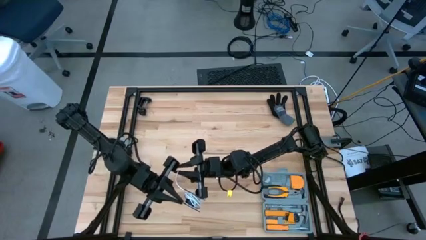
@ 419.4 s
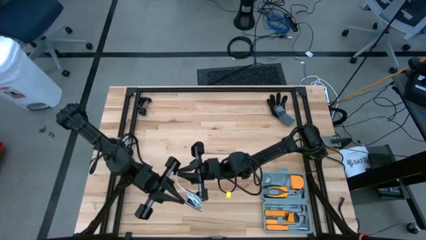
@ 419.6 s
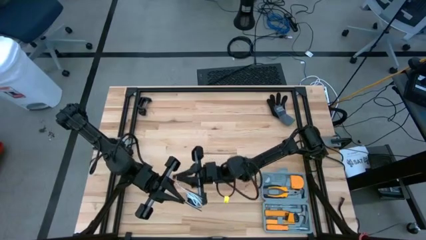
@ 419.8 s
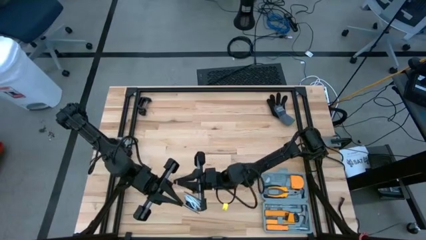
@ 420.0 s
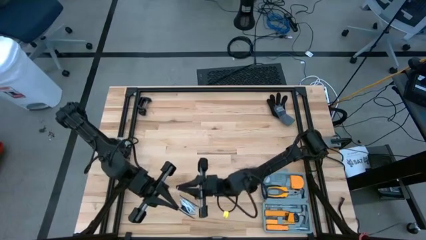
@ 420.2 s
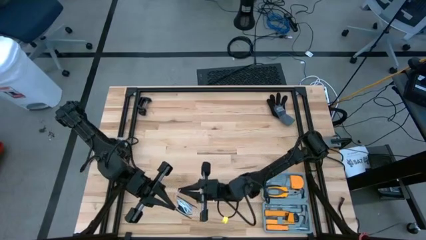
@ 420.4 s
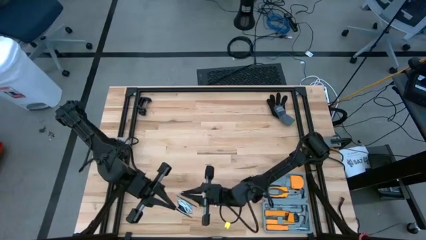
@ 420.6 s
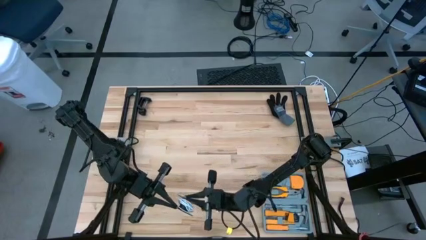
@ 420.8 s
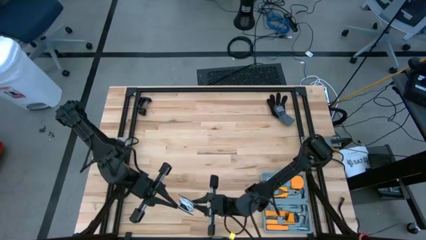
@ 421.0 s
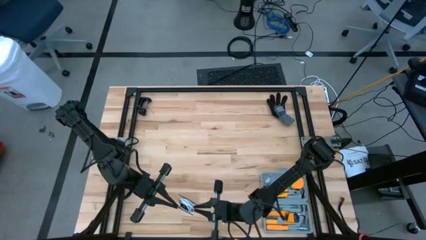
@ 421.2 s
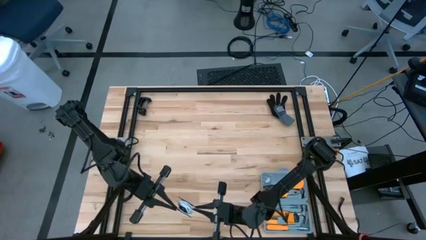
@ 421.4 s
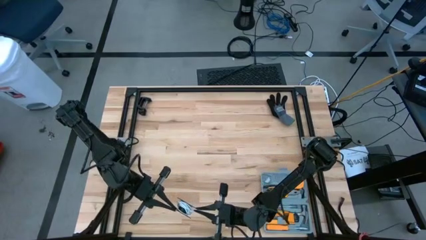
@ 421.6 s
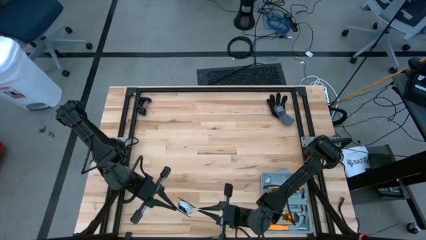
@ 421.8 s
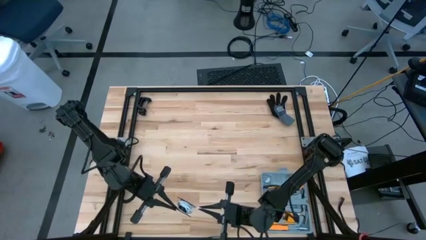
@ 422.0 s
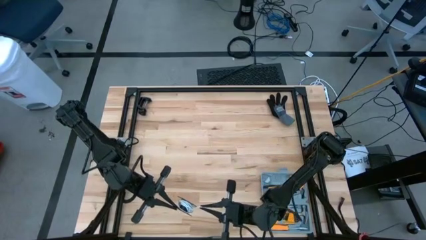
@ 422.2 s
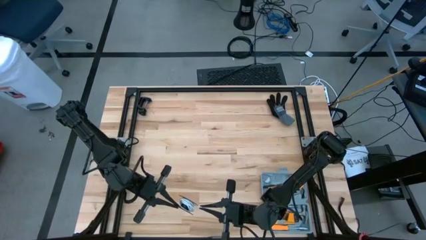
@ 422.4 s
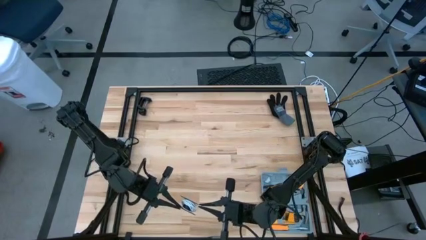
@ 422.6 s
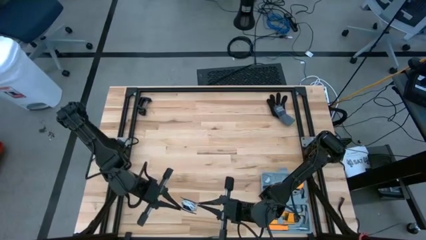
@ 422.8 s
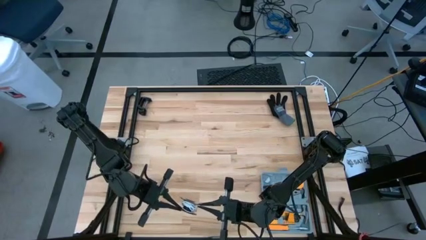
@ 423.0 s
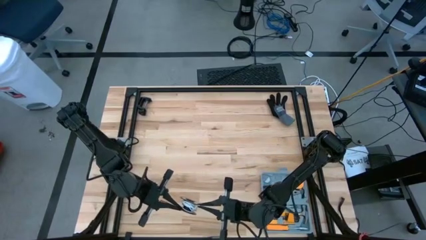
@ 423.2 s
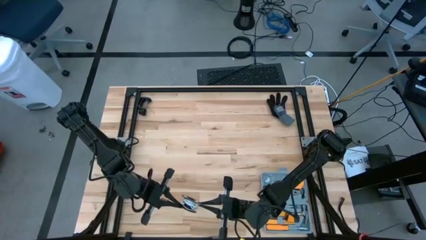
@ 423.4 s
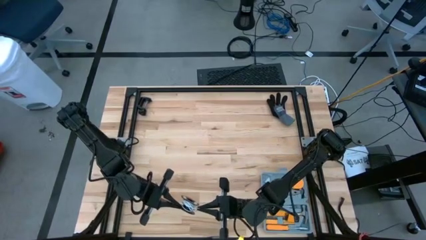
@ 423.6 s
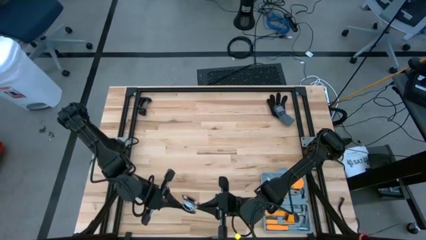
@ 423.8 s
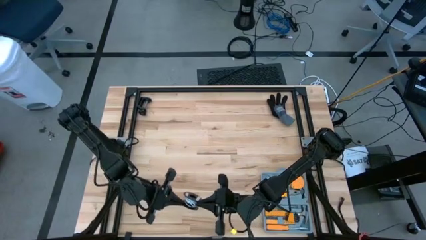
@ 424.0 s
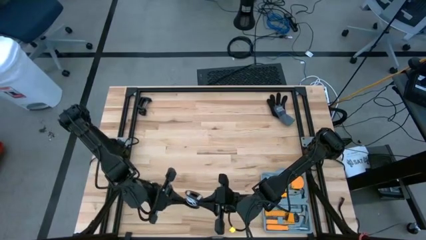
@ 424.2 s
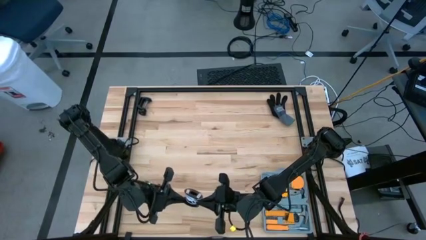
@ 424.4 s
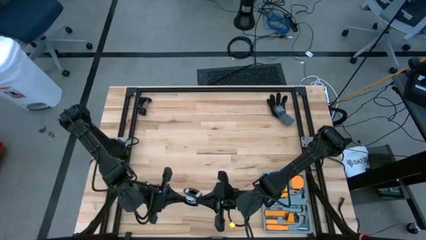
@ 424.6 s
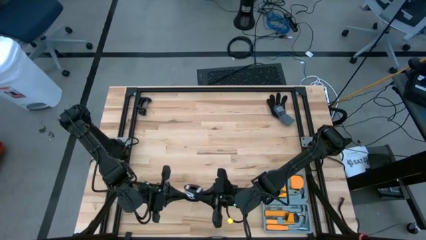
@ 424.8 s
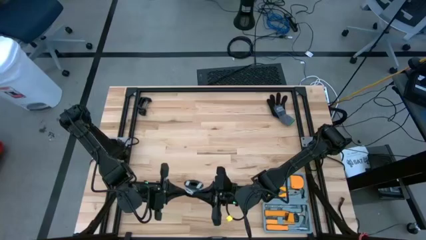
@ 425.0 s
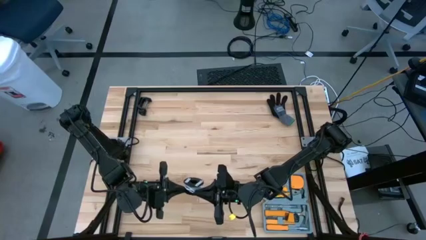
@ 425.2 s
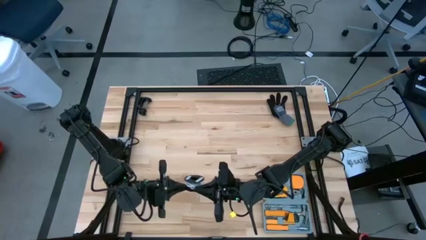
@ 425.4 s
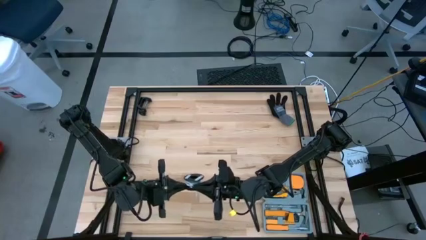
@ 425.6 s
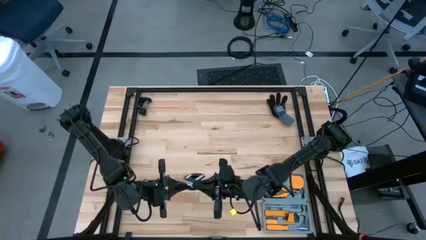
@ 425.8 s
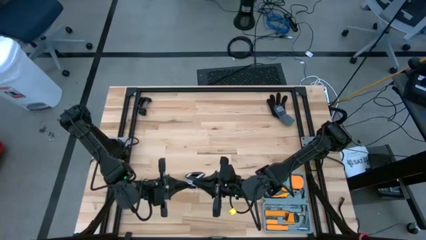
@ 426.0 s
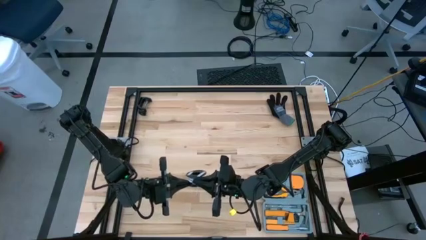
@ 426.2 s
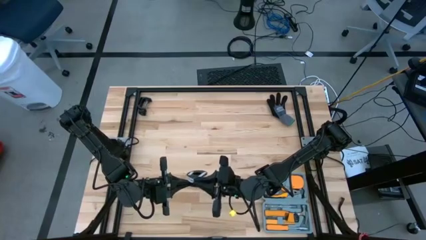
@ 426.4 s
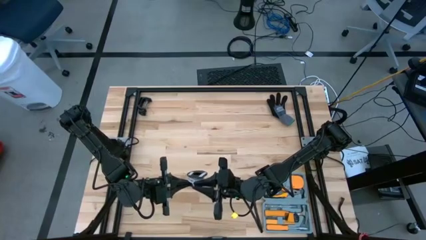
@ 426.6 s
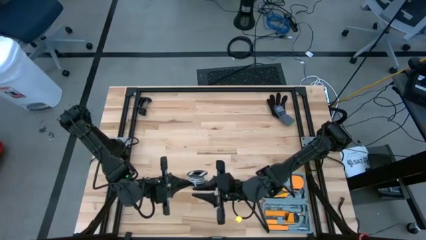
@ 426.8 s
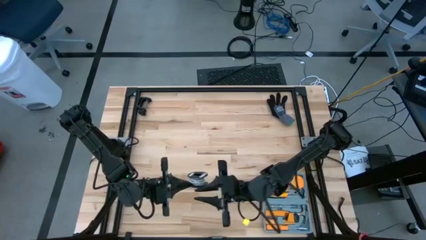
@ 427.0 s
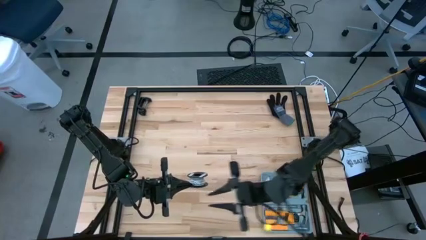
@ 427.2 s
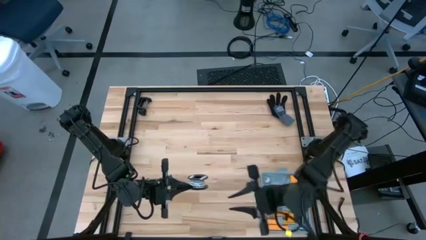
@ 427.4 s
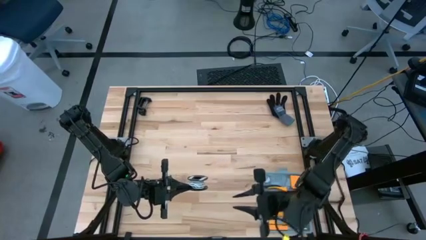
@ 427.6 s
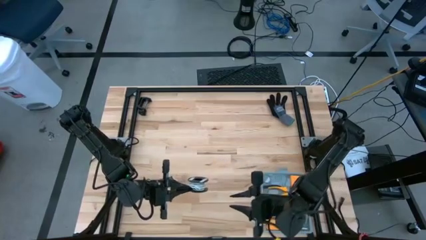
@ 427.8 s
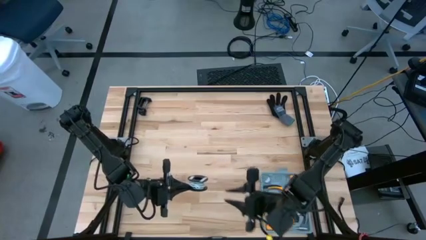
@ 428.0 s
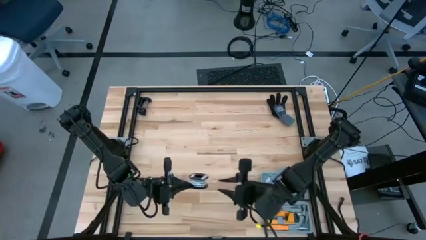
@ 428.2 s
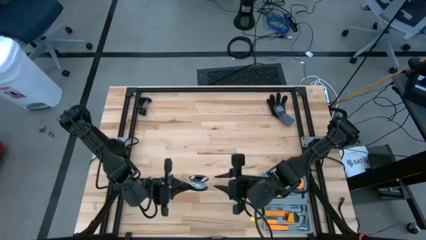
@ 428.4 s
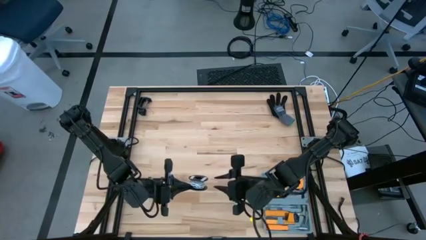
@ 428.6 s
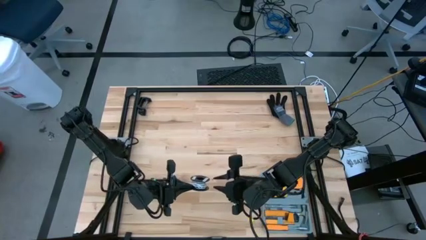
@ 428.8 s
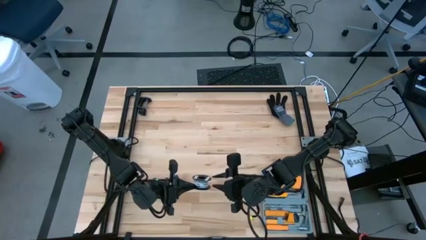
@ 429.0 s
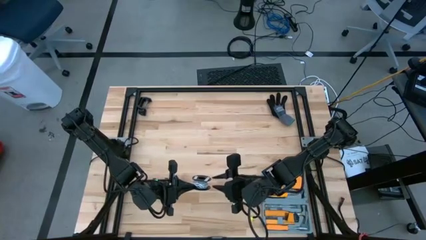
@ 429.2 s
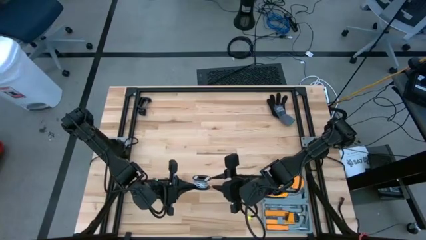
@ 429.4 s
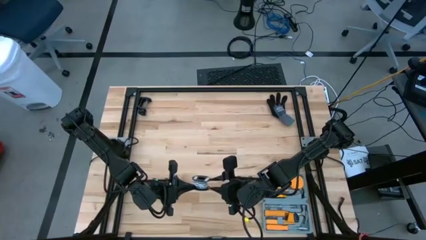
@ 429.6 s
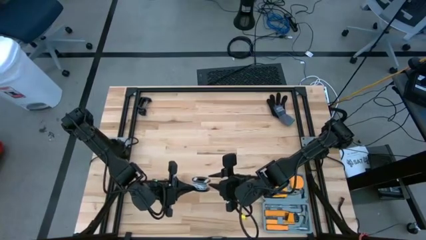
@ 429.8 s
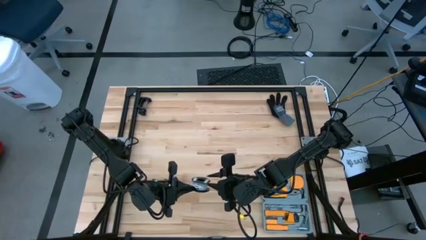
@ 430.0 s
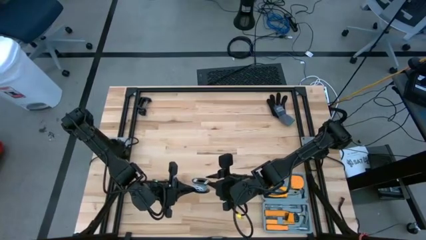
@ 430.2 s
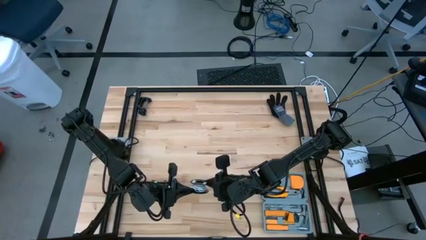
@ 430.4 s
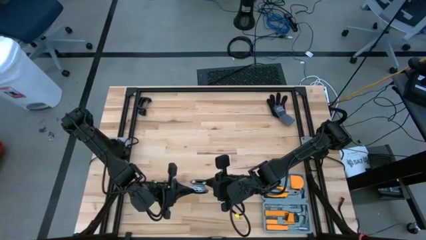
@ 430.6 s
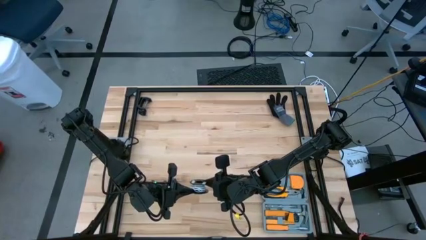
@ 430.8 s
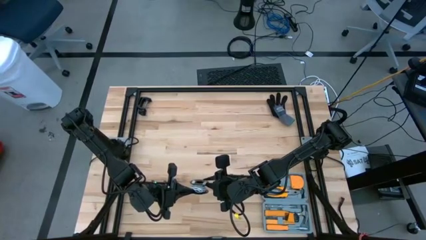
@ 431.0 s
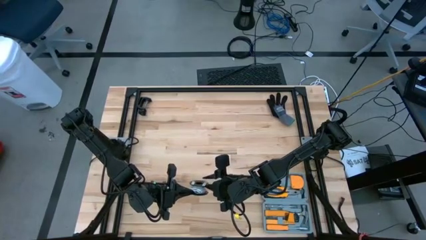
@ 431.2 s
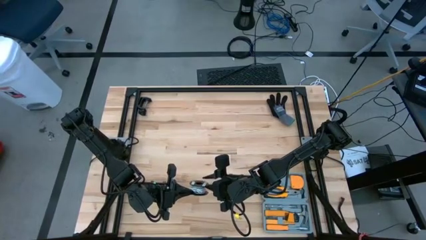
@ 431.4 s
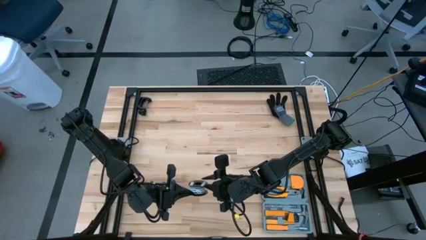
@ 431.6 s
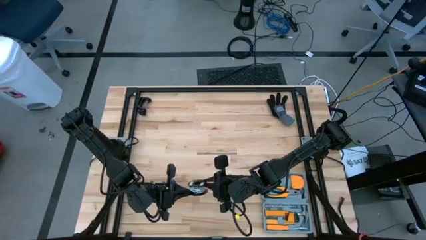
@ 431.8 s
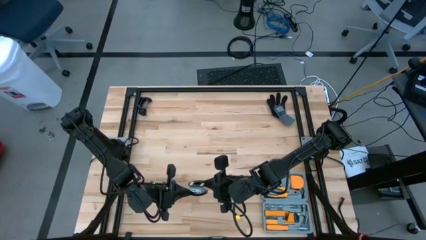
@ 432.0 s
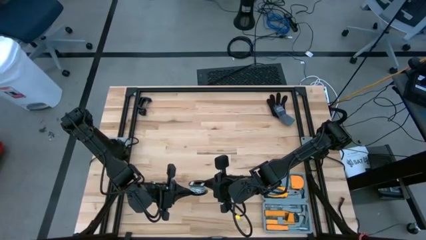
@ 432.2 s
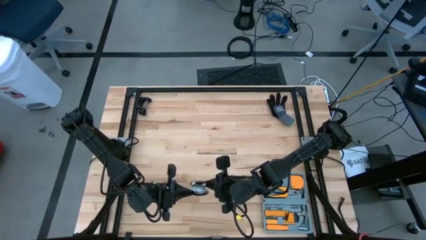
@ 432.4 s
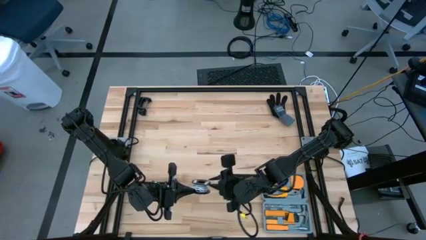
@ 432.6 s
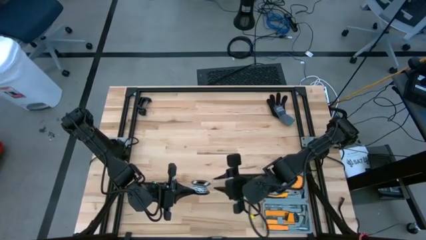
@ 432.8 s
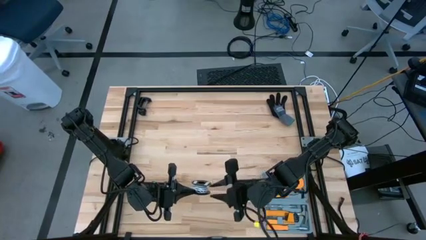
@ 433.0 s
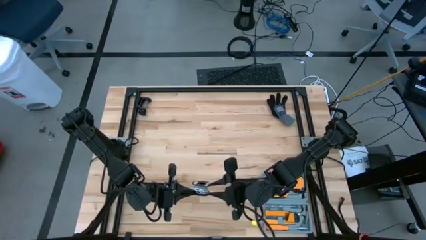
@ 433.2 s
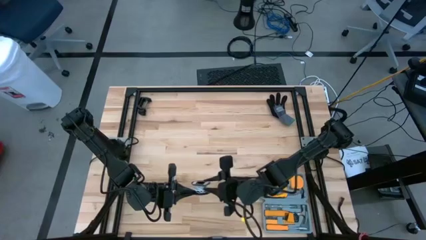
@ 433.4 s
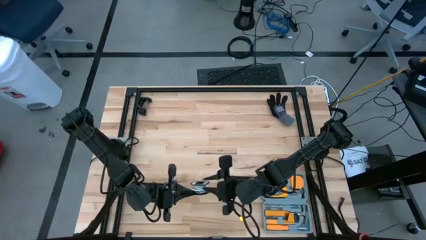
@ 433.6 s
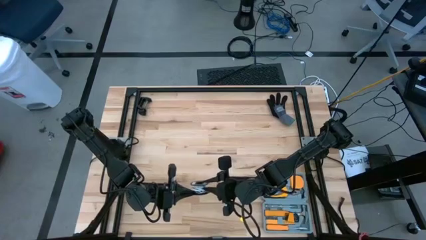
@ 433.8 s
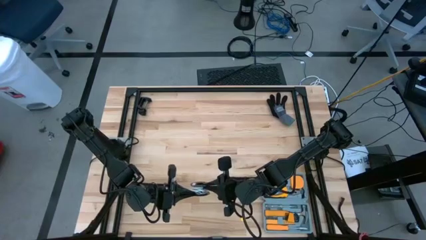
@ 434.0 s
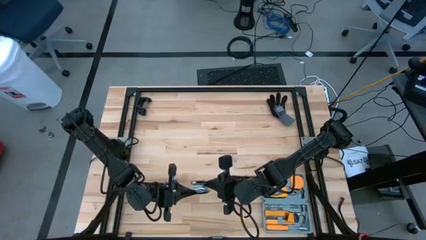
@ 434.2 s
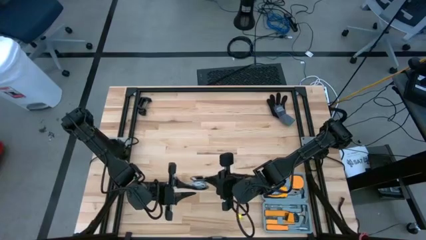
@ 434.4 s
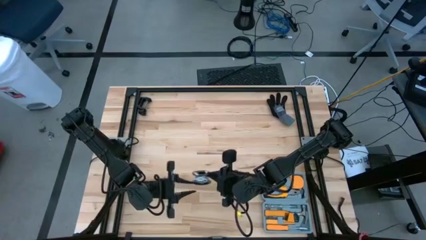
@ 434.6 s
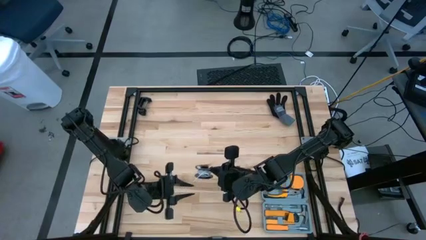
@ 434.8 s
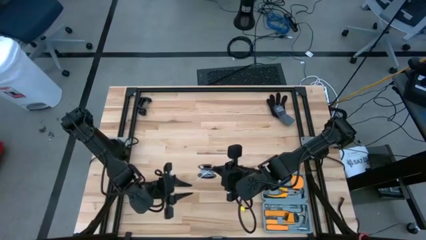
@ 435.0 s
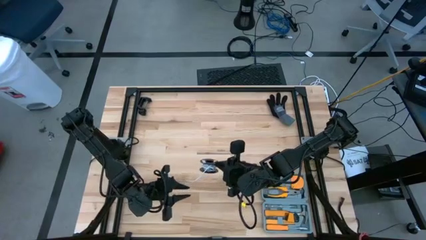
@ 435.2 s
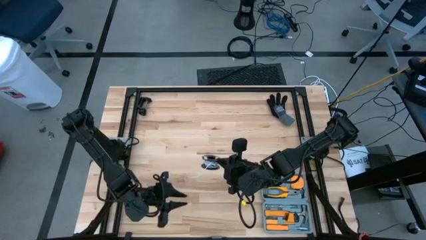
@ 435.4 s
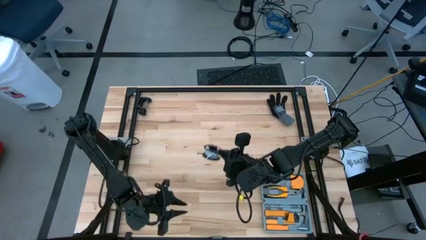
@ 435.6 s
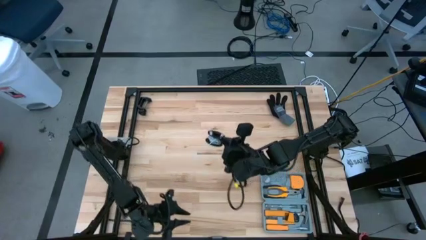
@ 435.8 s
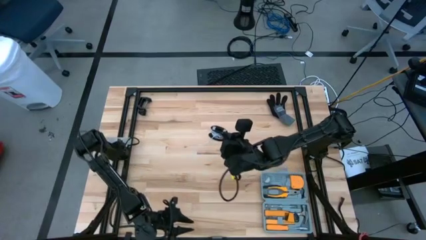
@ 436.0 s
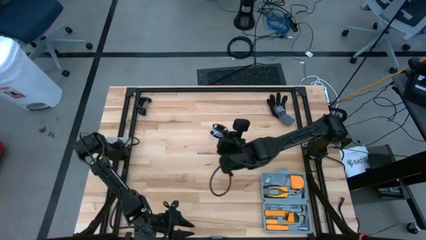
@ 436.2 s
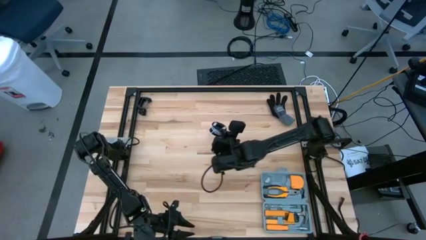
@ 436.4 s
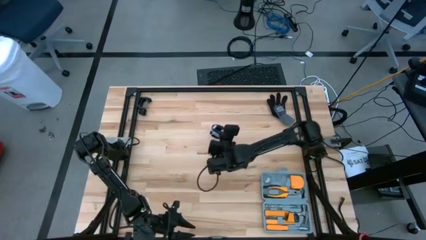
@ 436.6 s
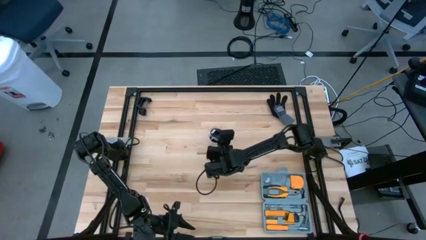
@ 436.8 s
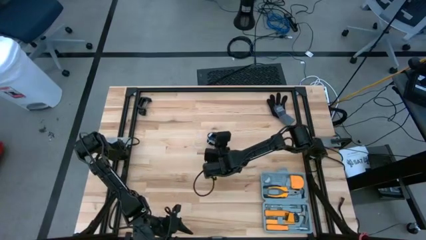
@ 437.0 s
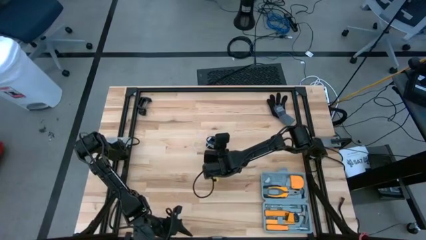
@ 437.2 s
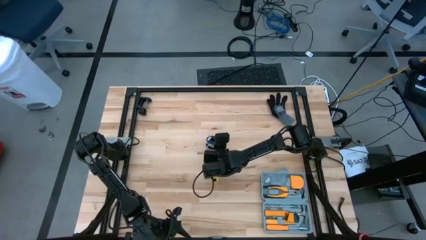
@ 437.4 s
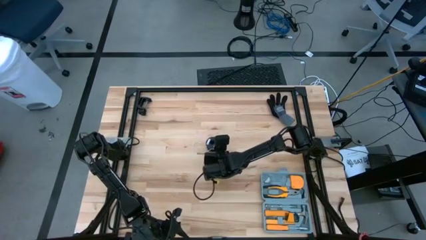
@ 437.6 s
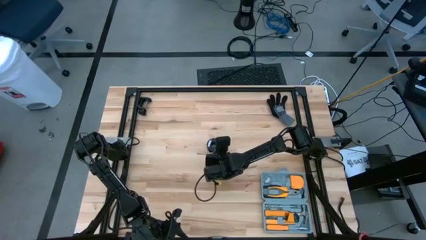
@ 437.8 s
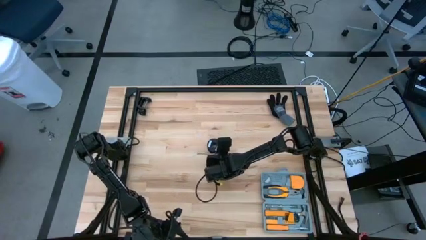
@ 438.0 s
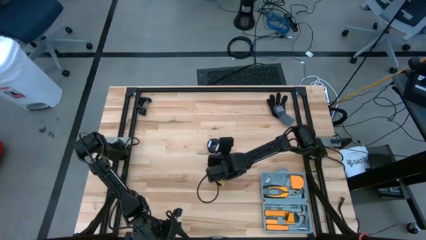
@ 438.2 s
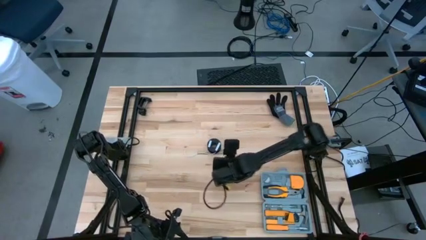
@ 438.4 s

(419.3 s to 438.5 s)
Task: Coil cords
Coil the white cable wire onto the spool
